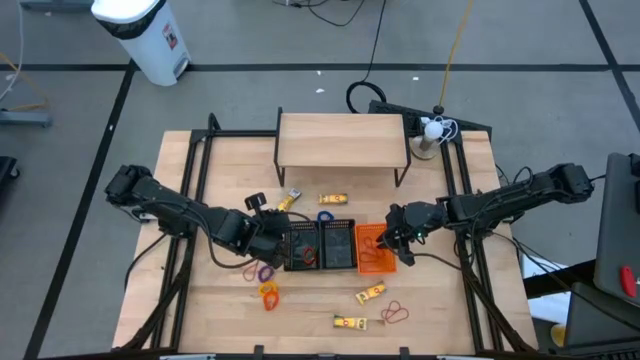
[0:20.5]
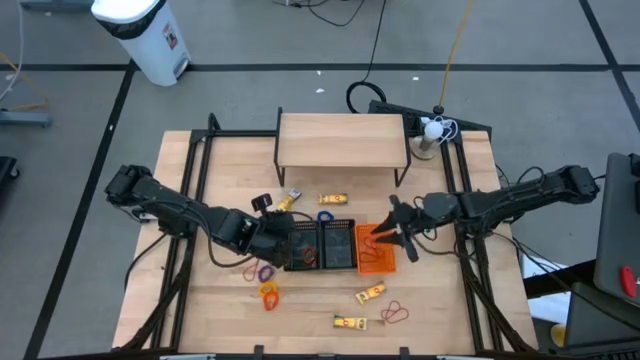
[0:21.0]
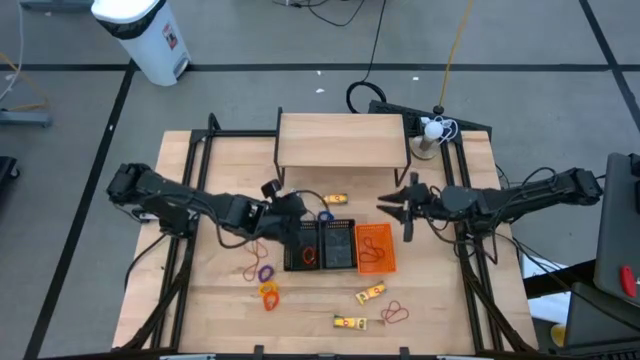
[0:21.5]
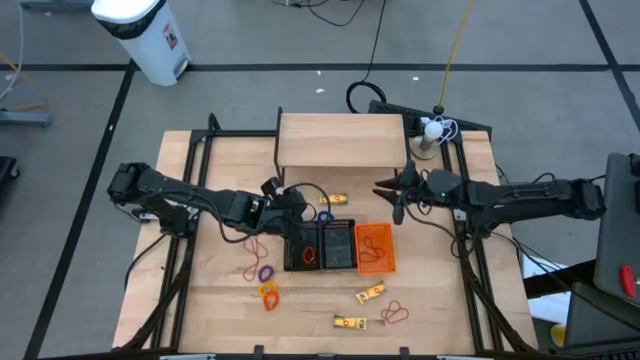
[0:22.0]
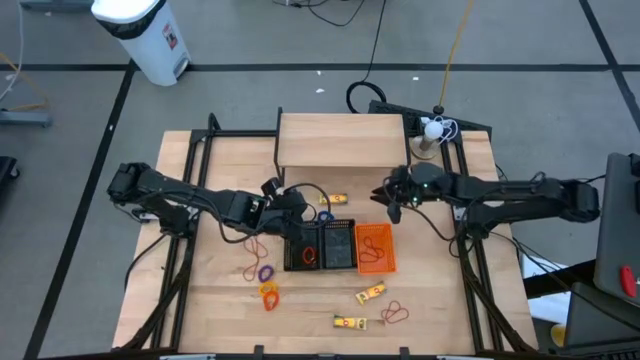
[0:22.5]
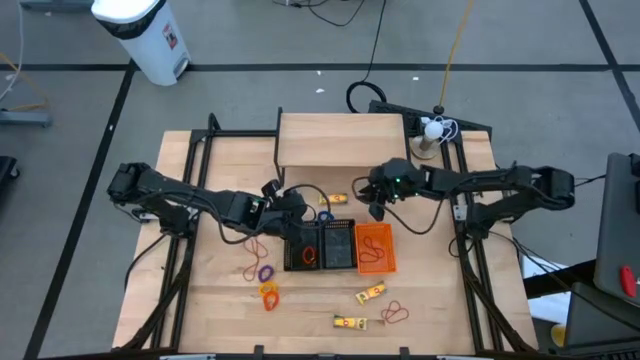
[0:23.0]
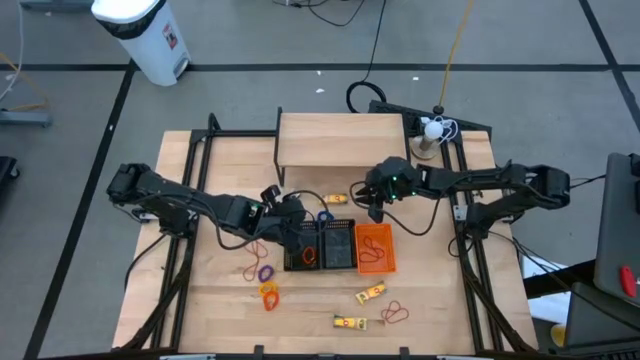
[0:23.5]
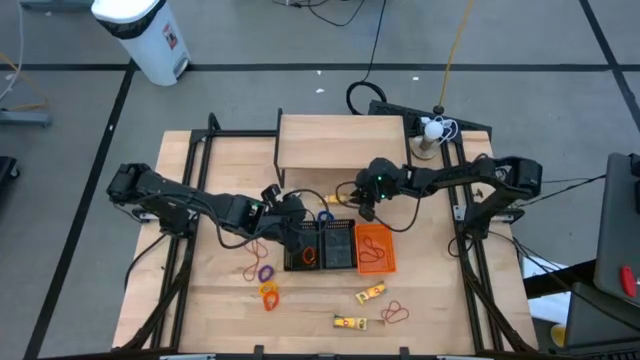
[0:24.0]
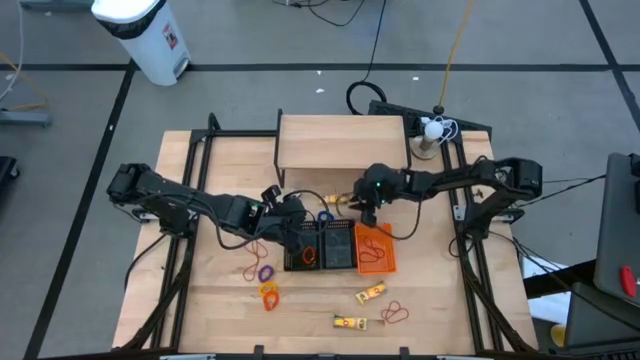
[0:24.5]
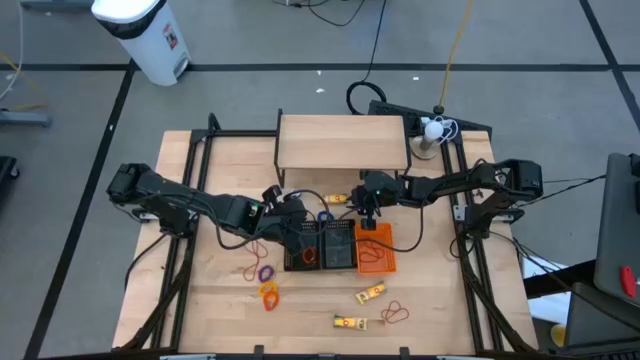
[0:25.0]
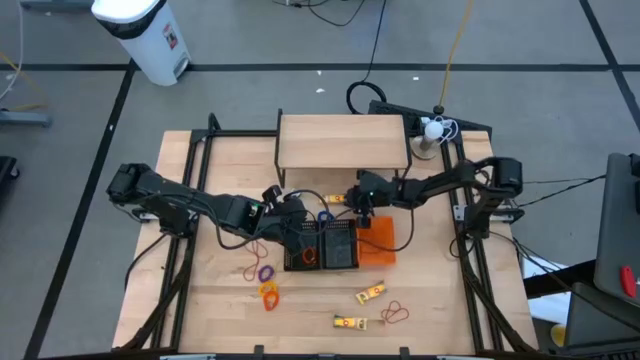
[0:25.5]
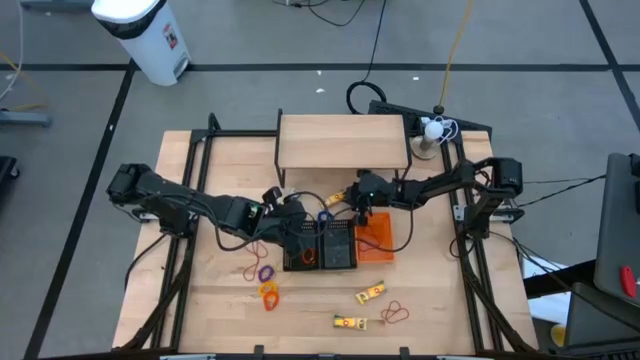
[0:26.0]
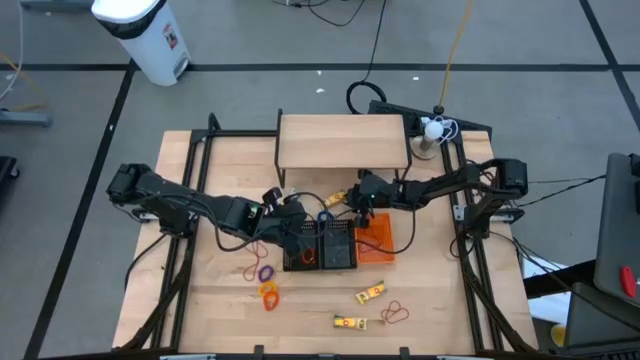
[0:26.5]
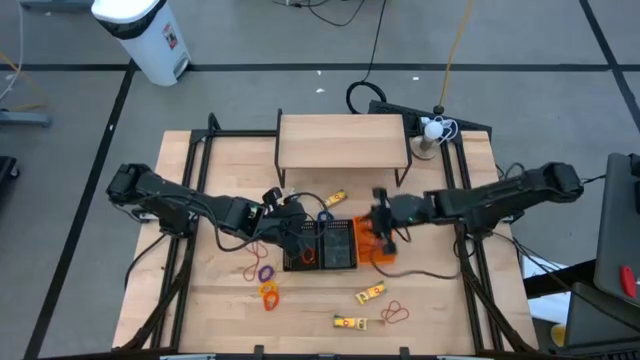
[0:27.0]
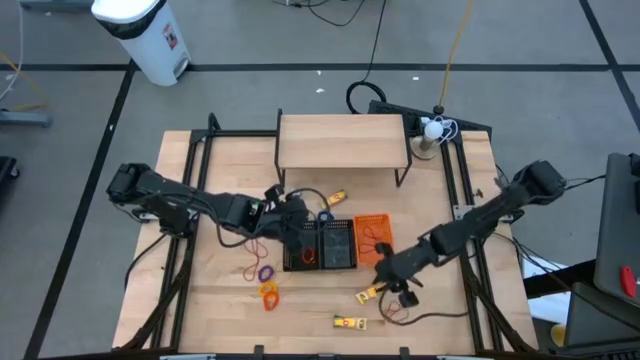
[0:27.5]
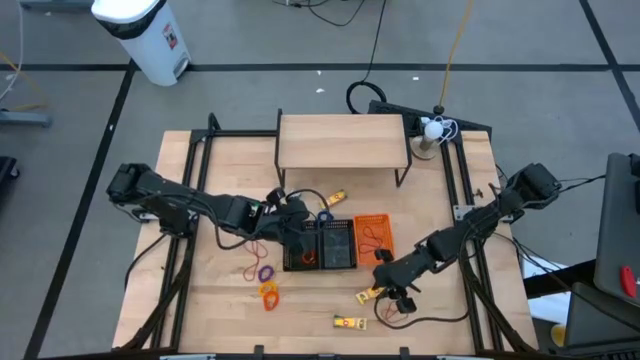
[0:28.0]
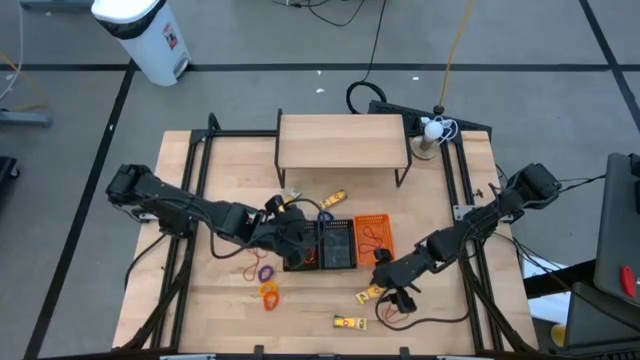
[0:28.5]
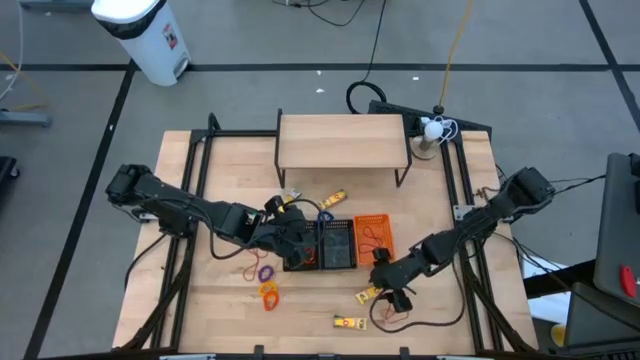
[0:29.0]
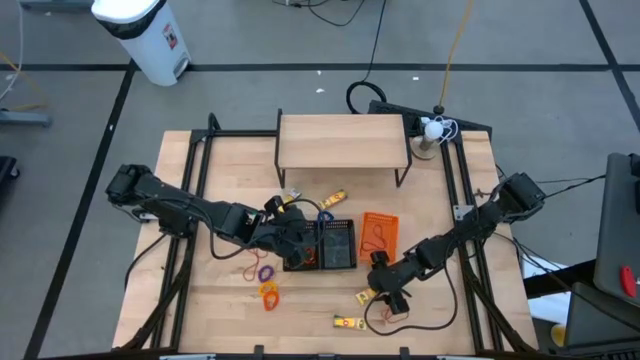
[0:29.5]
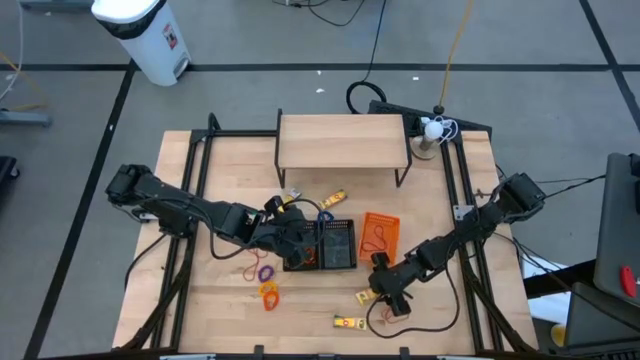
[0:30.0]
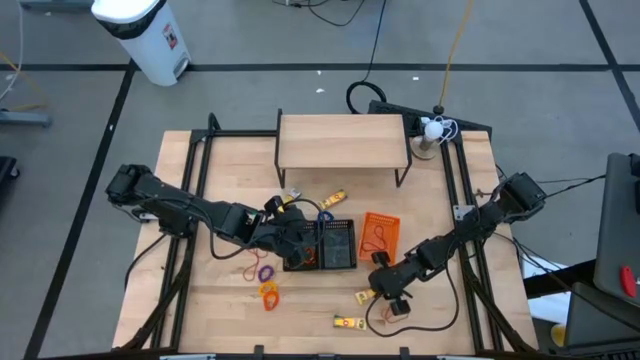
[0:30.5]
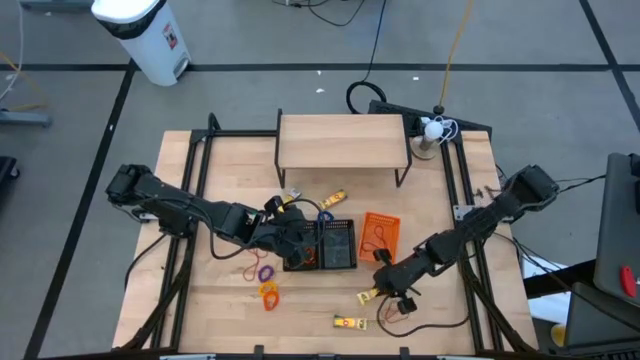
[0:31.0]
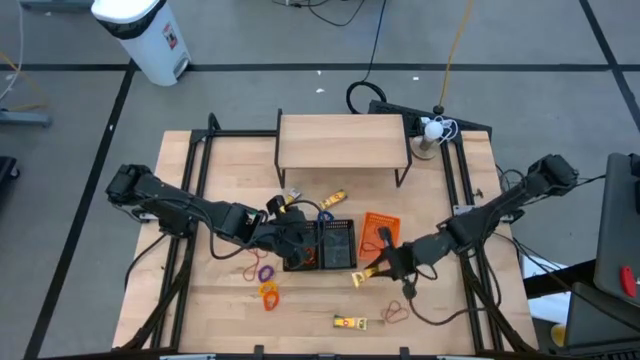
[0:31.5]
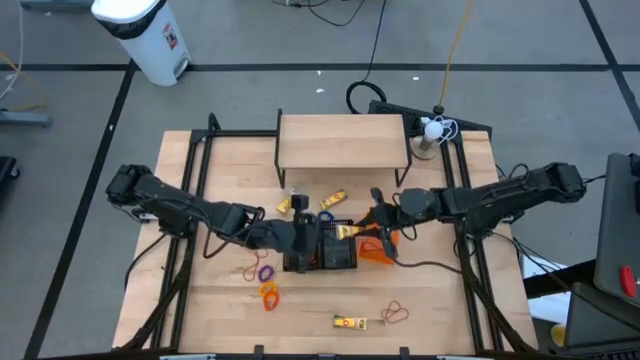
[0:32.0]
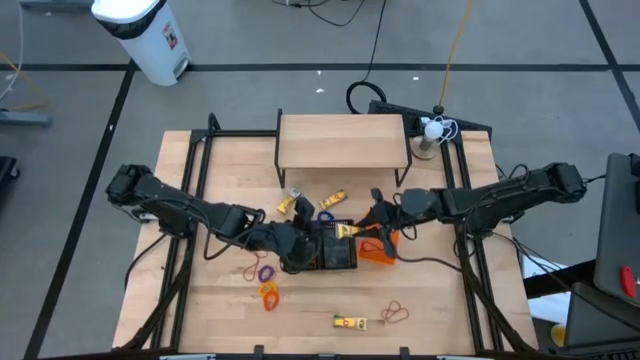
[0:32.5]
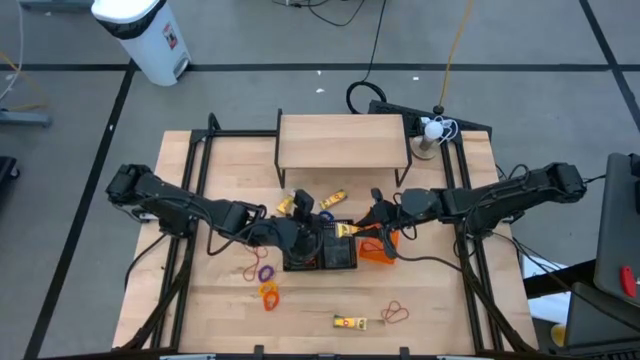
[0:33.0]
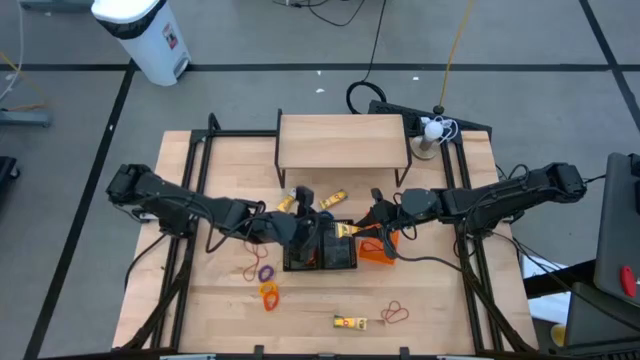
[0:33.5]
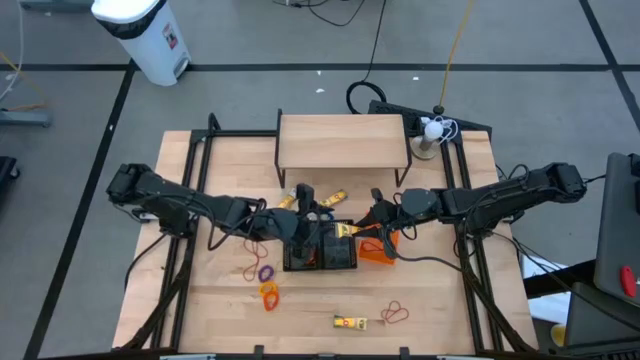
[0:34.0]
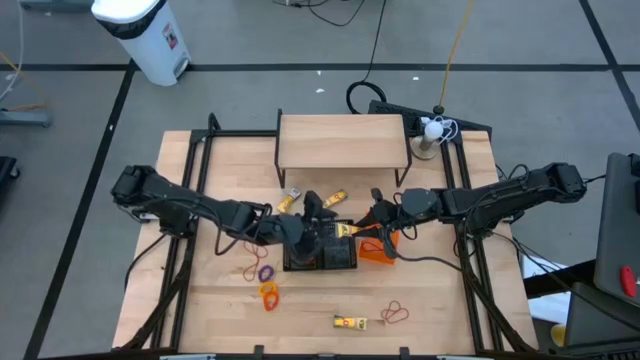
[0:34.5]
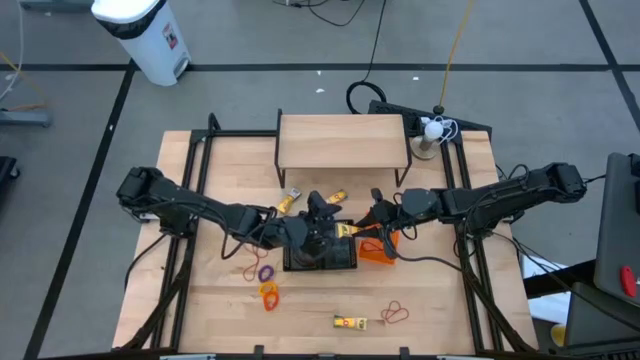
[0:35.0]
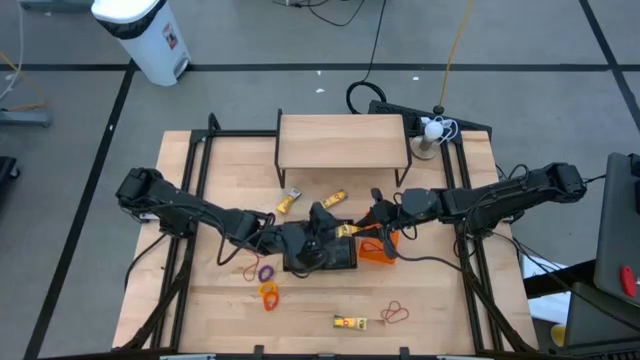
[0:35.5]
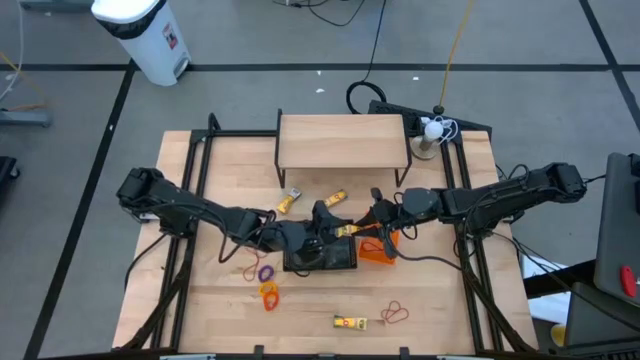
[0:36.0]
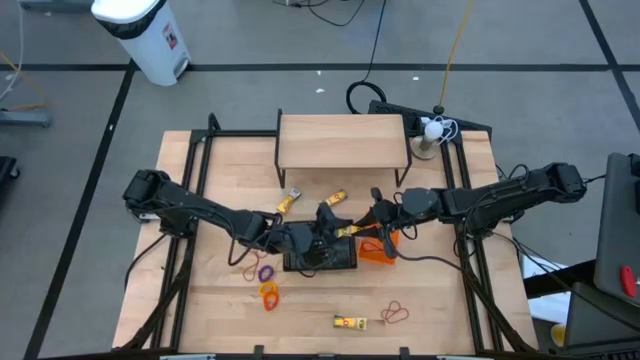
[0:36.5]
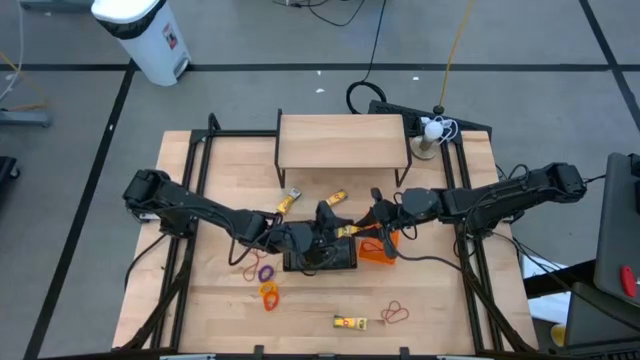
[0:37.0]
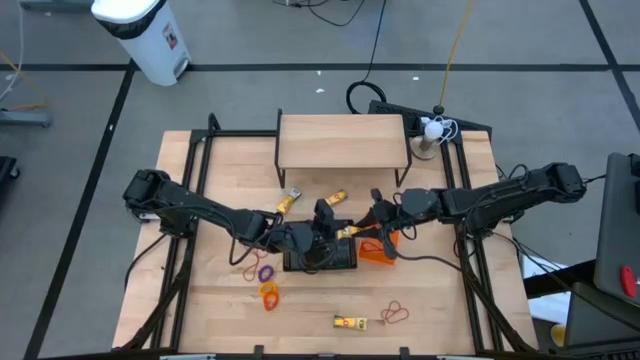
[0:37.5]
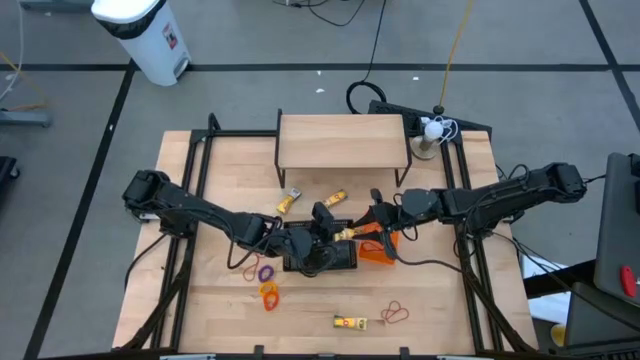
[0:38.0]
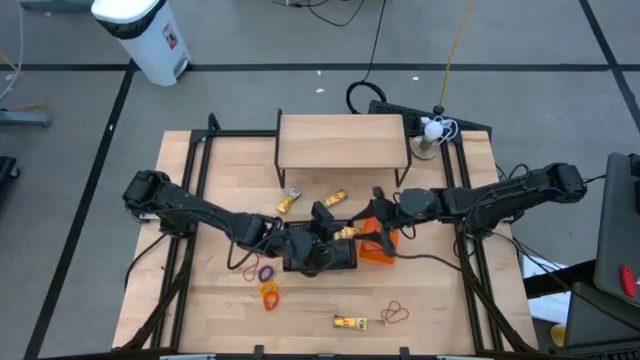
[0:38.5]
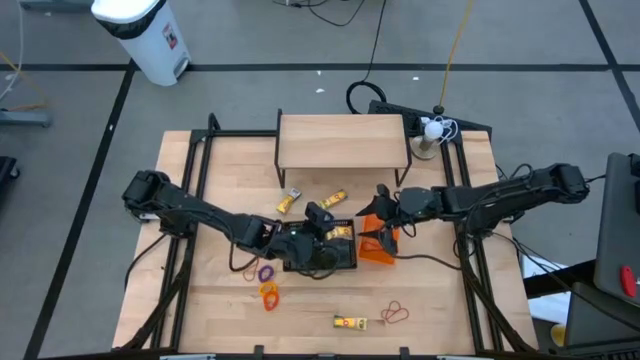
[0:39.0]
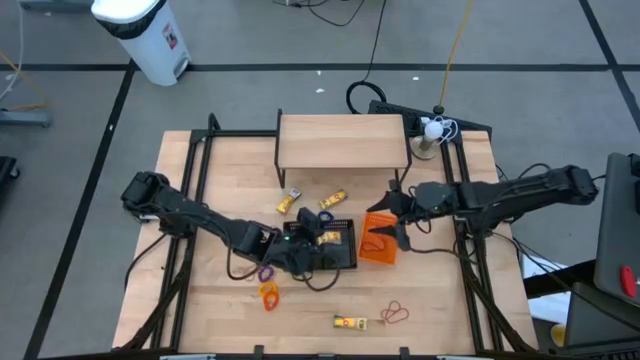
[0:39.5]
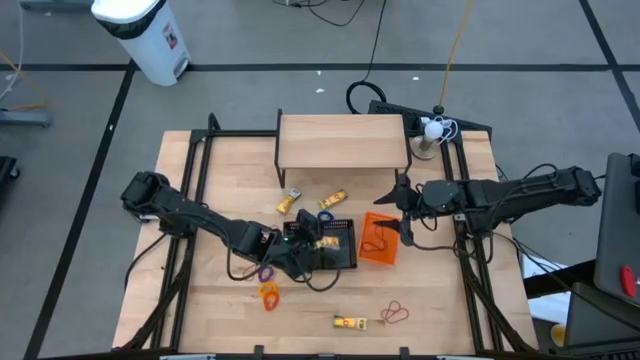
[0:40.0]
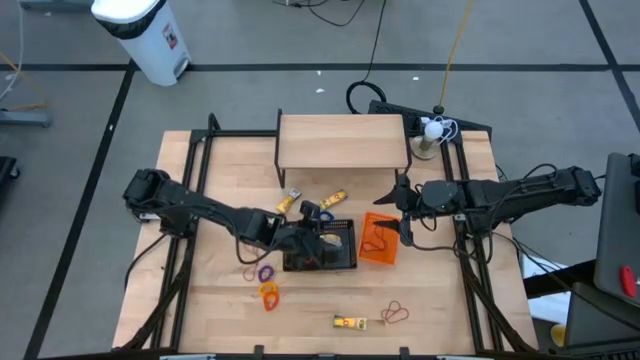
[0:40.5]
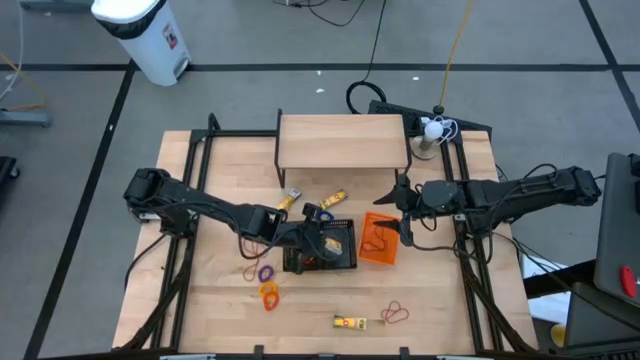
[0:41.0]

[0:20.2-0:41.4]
Task: Pick & Place Office Desk Supplies
Put the crayon box into the right black basket

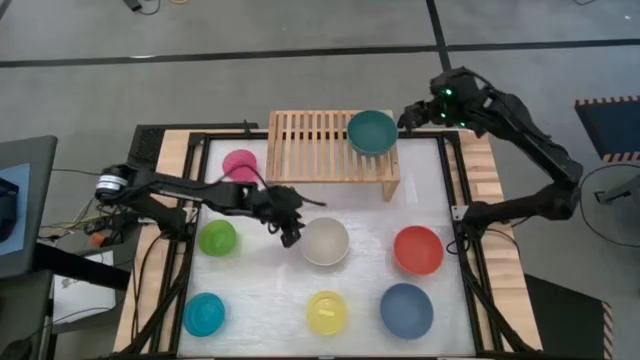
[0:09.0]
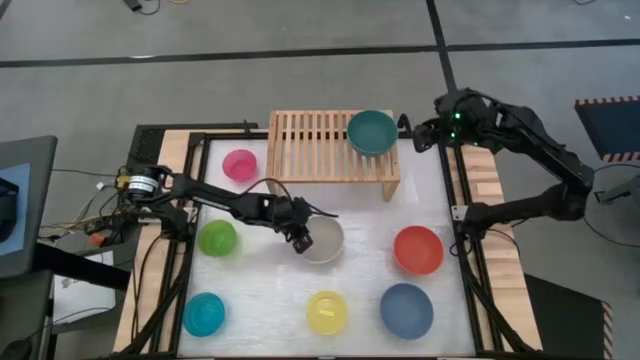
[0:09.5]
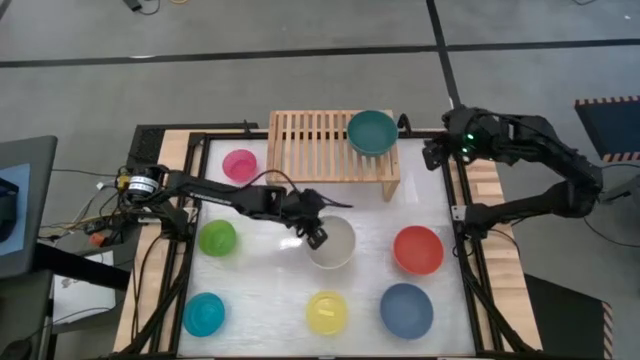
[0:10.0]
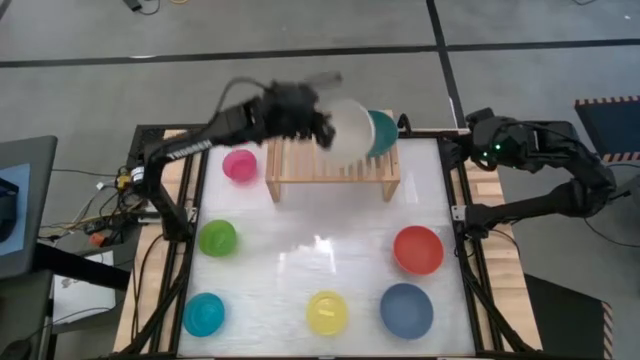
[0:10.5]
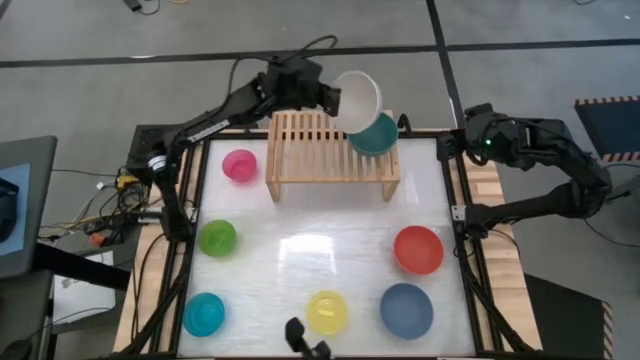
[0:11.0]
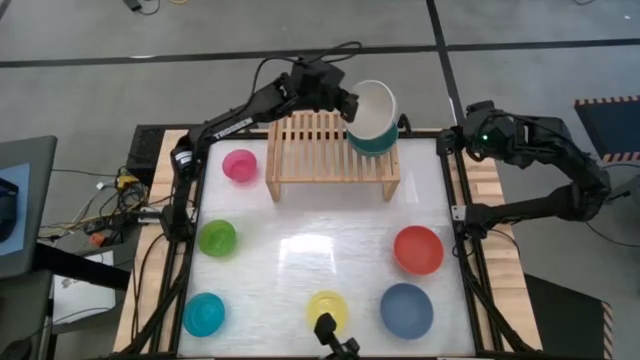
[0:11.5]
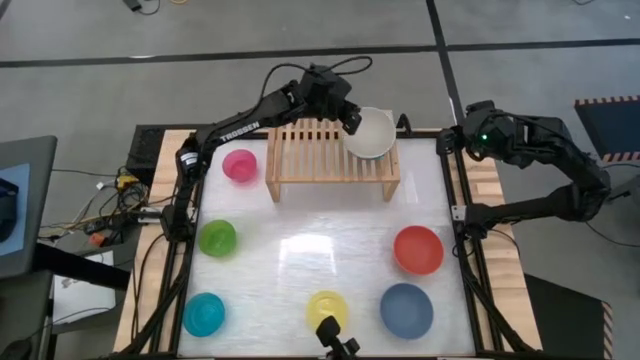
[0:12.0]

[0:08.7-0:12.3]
Task: Place and stack bowls onto a shelf
Stack the gray bowl on top of the dark green bowl on the shelf
